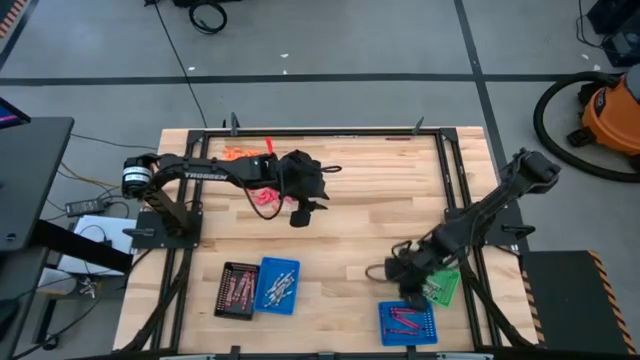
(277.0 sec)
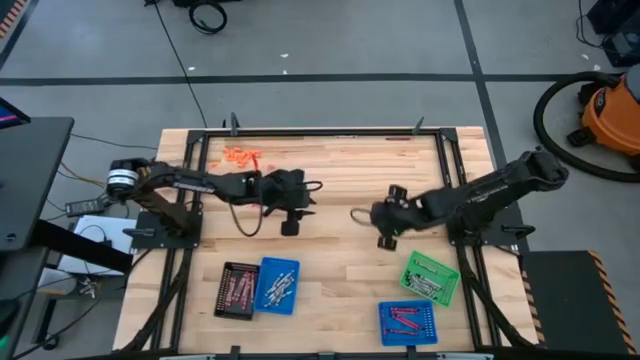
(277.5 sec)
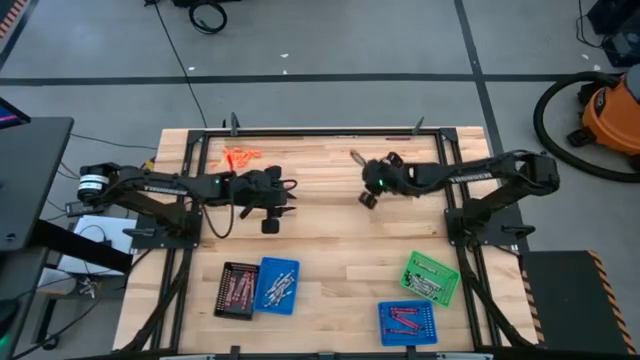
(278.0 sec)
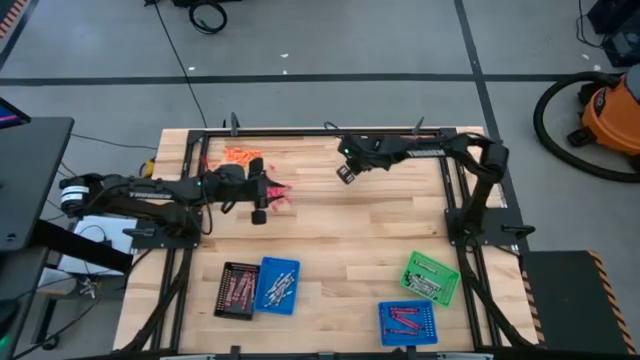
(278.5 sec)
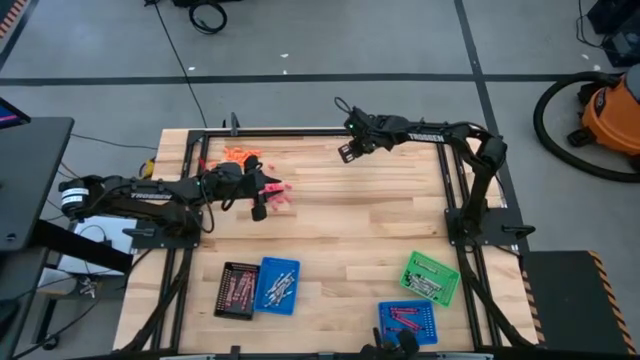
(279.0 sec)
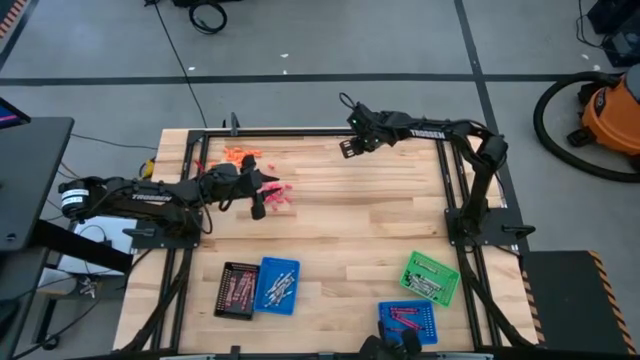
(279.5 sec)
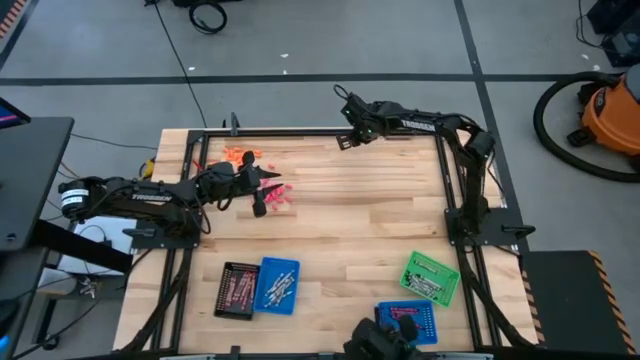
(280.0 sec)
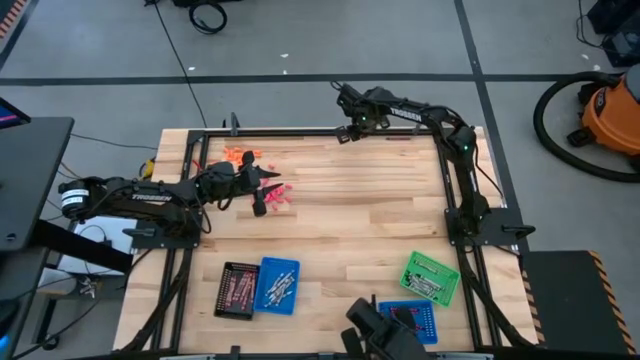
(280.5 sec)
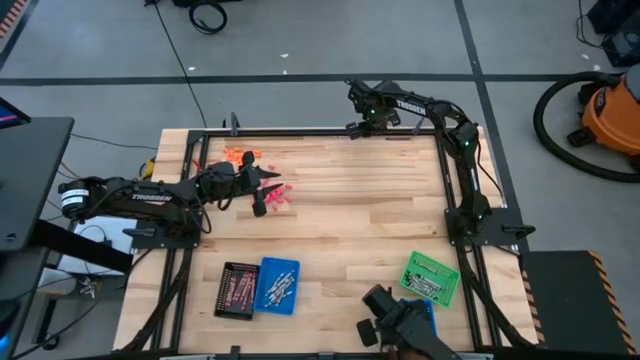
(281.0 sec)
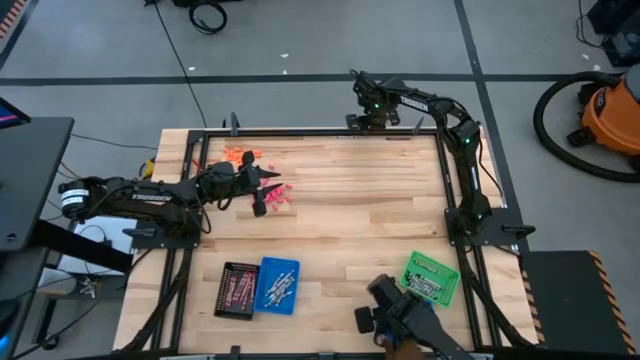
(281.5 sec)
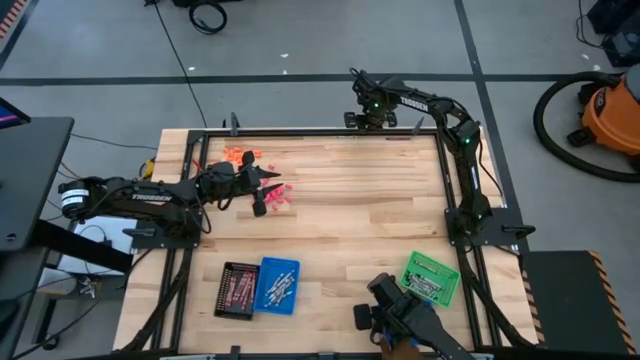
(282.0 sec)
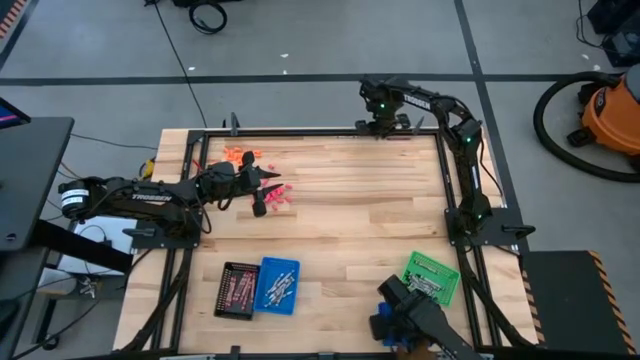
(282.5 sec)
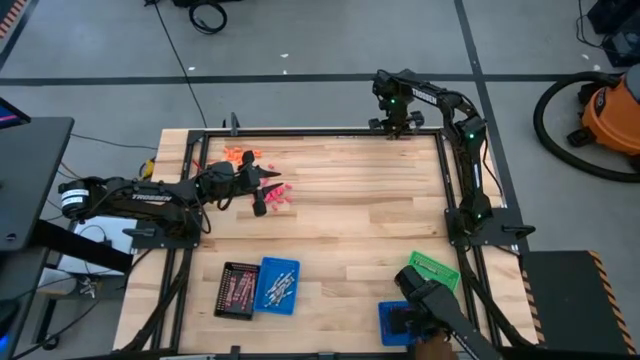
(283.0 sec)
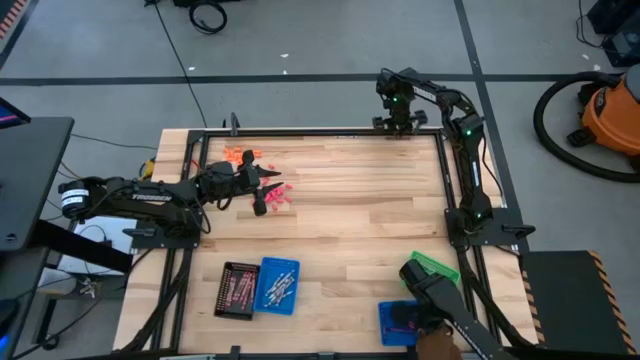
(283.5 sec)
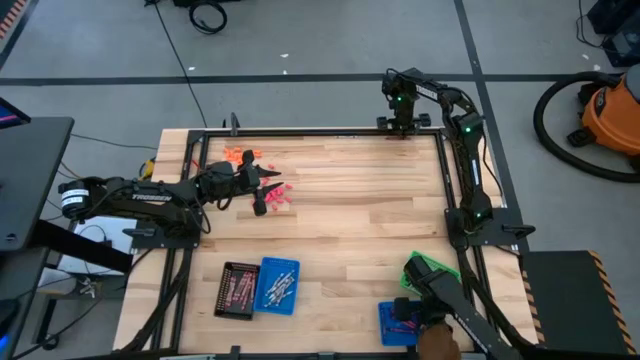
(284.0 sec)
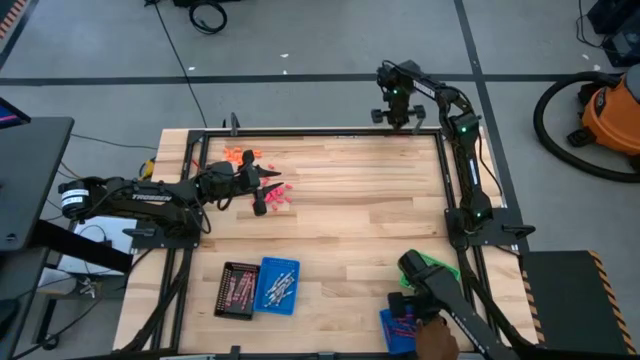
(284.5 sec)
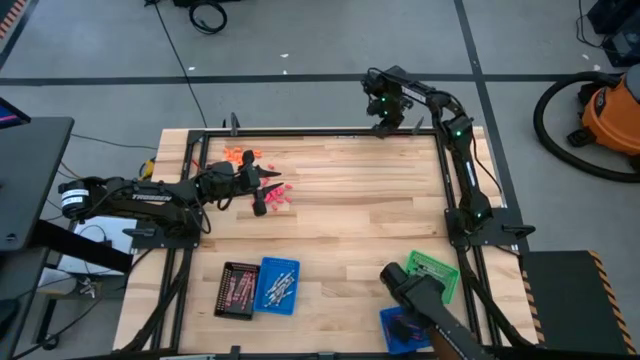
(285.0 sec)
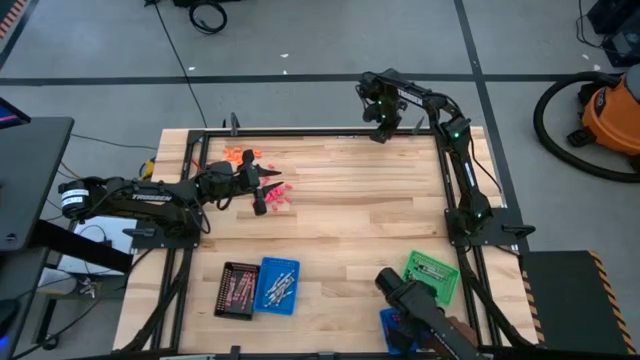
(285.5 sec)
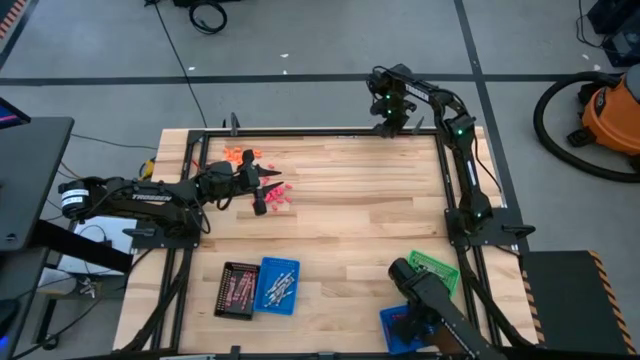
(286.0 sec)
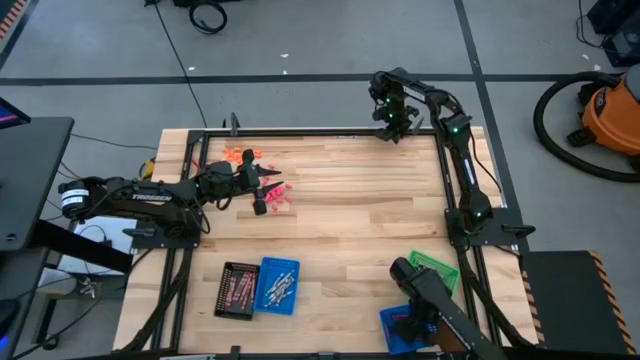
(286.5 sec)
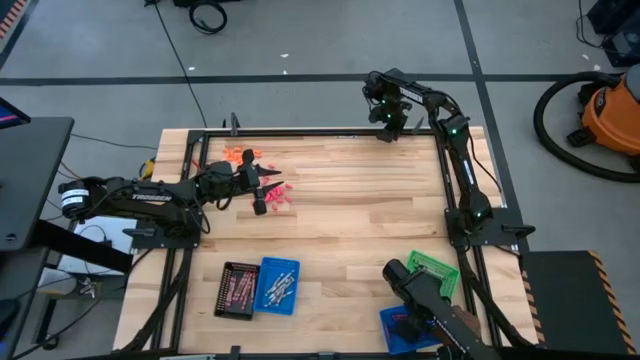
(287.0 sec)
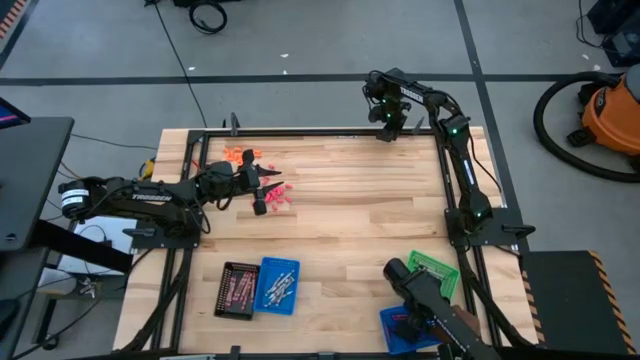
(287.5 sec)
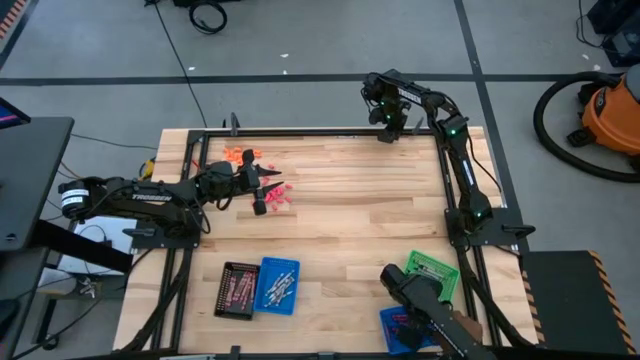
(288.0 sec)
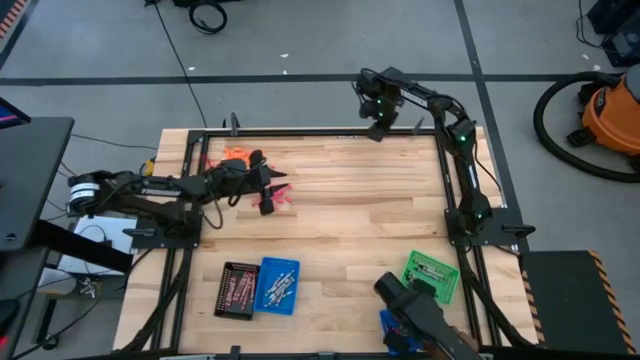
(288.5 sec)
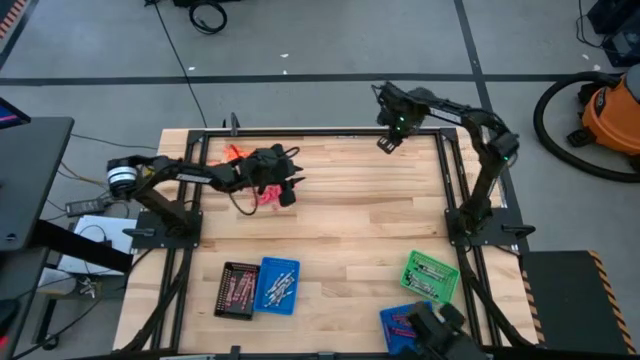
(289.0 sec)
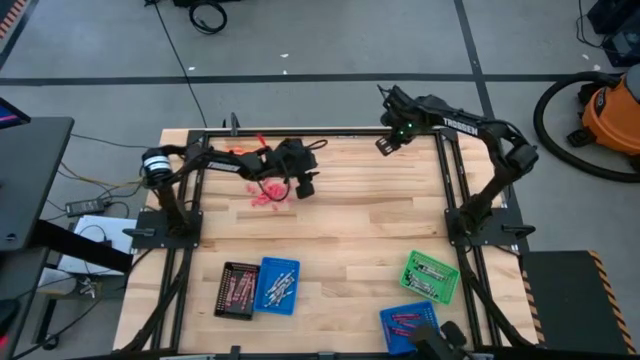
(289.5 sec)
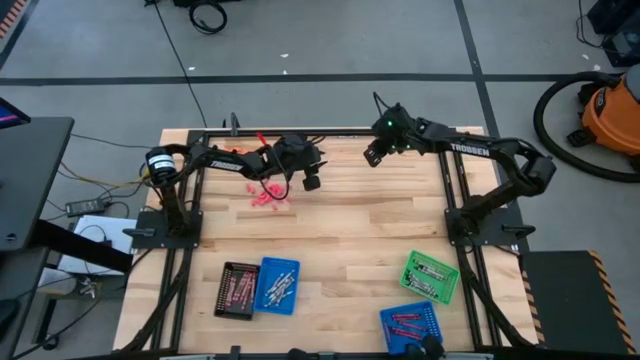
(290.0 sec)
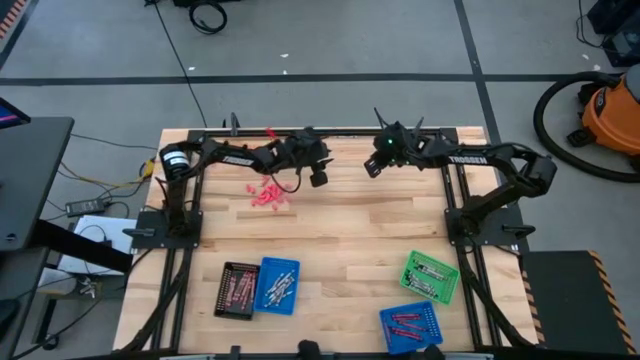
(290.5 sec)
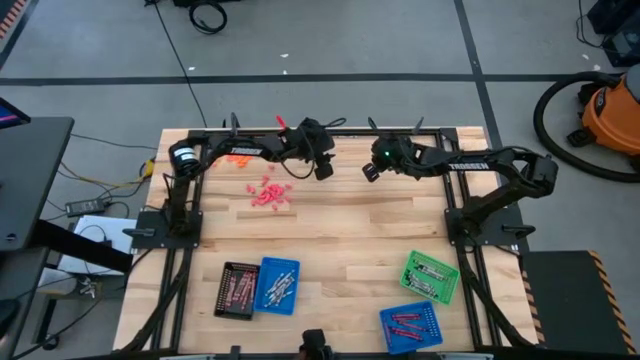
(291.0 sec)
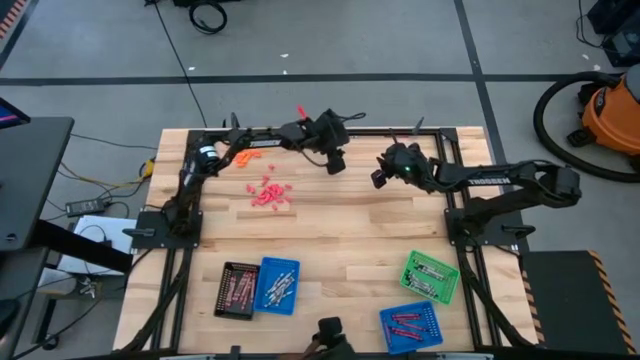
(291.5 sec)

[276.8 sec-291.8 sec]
Task: Sort crayons
Put the white crayon into the left blue bin

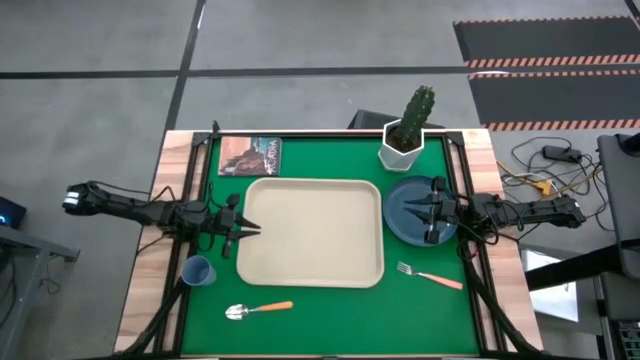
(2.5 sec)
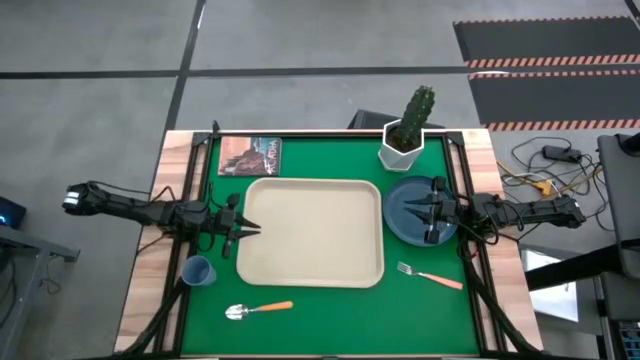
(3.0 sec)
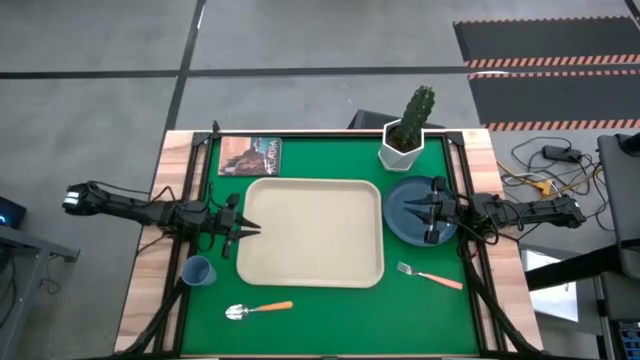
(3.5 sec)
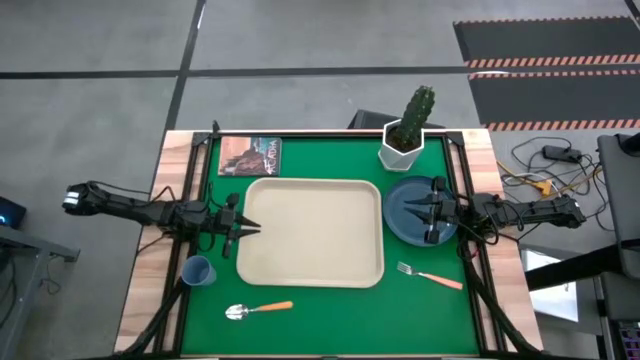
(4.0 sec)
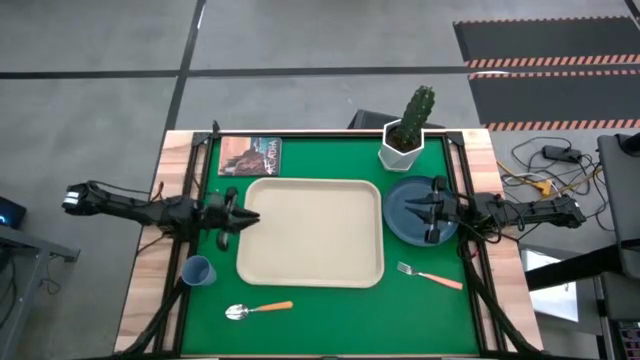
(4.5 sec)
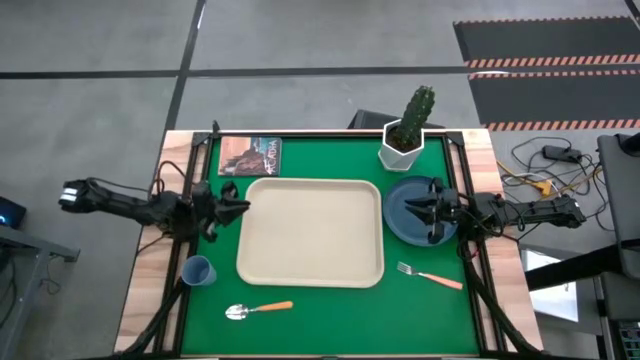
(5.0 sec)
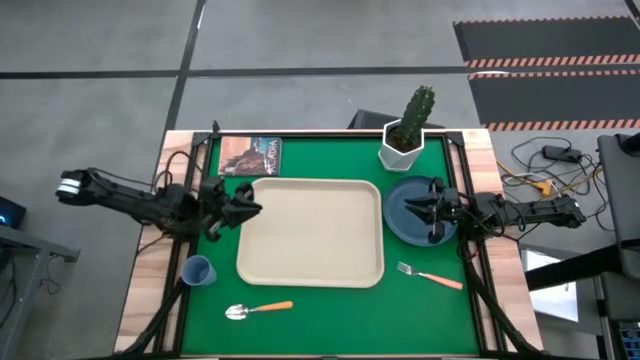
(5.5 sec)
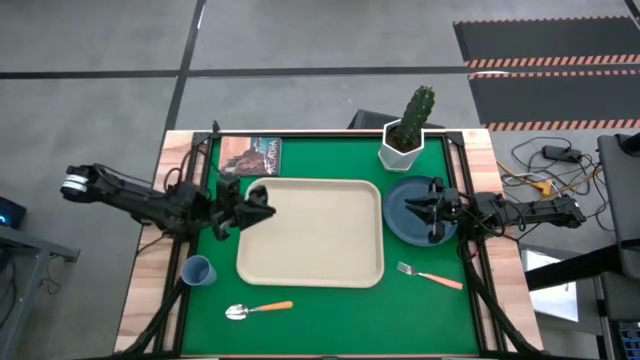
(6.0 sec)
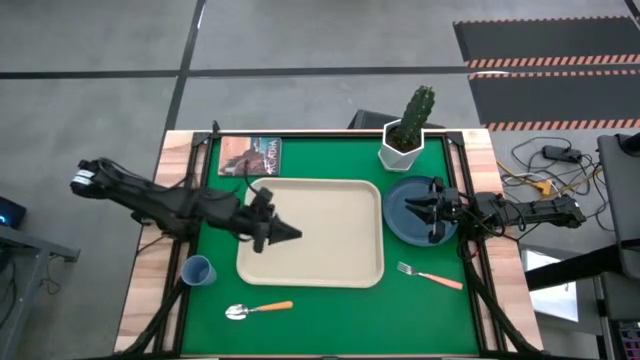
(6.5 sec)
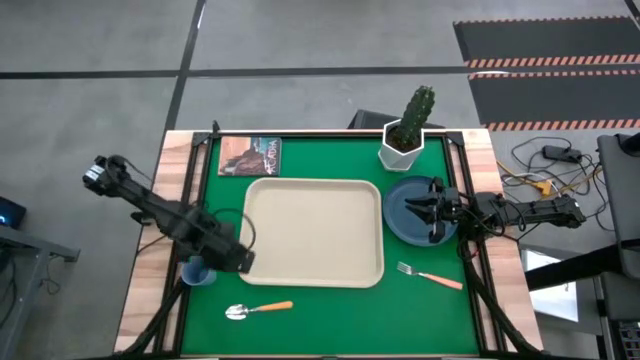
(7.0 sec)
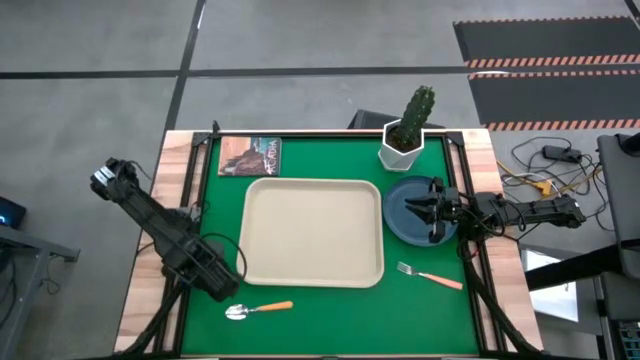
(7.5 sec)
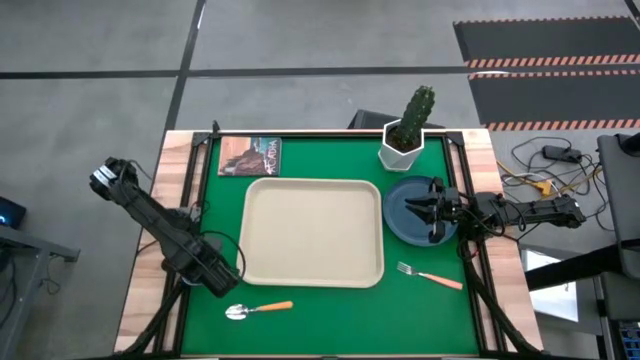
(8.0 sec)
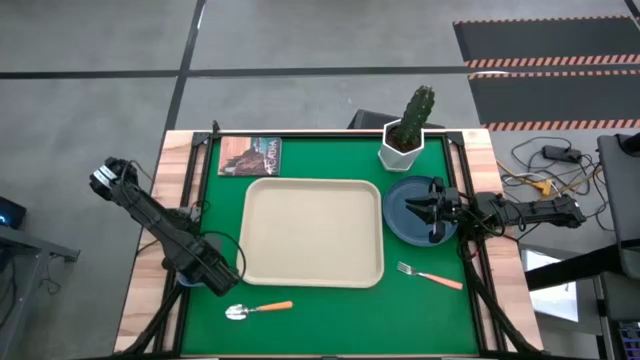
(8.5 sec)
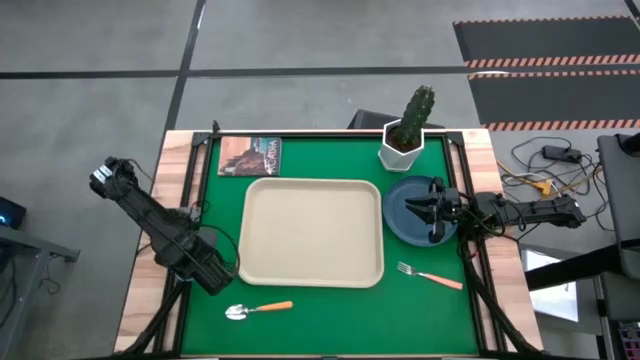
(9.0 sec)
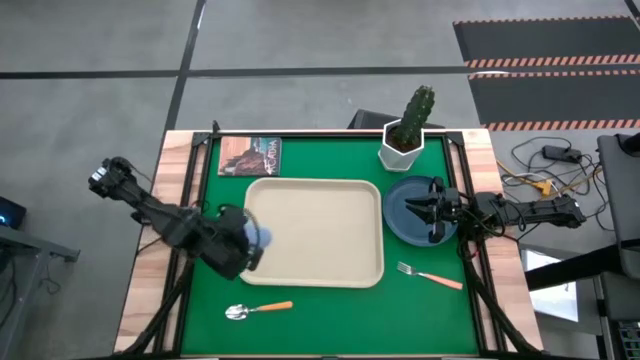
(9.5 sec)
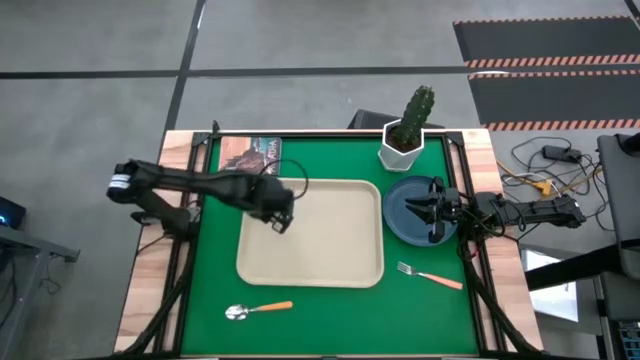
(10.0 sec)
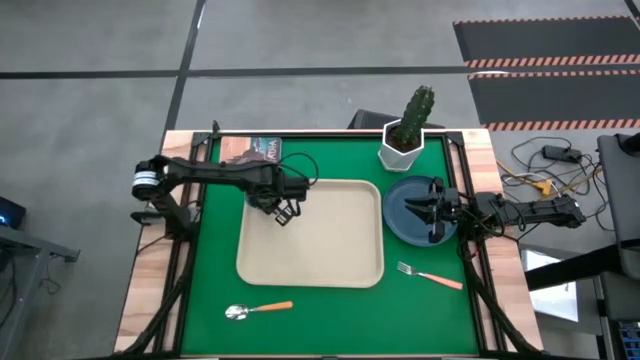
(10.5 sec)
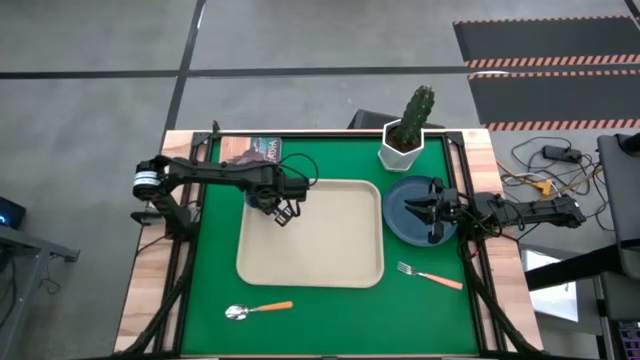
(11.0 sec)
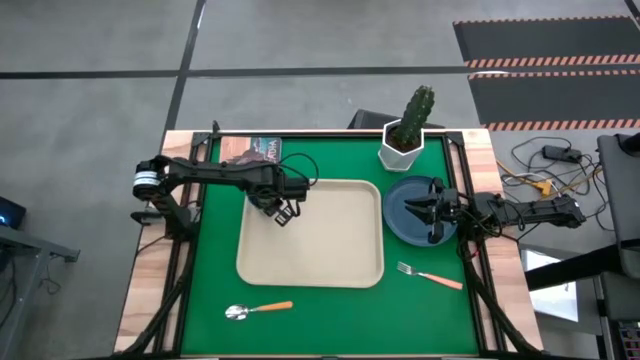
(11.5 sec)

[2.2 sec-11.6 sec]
Task: Pick and place plate/cup/fork/spoon on tray
Put the blue cup on the white serving tray
